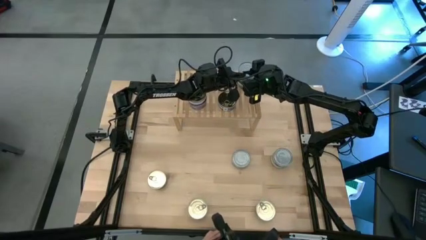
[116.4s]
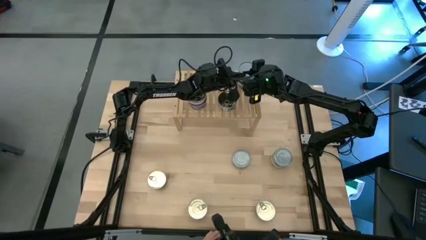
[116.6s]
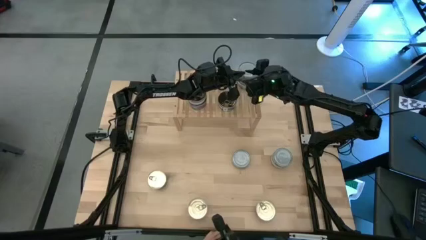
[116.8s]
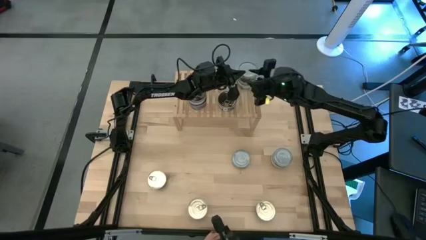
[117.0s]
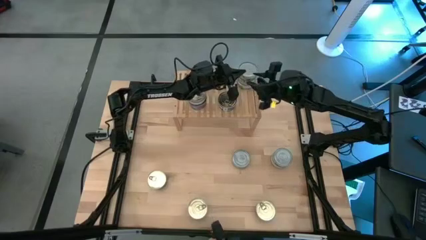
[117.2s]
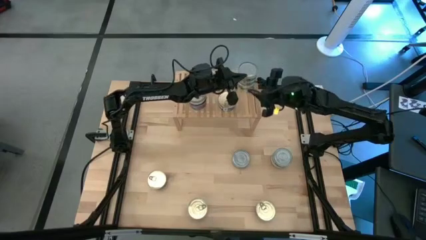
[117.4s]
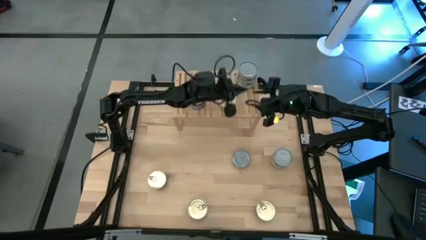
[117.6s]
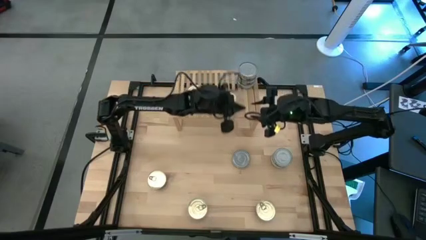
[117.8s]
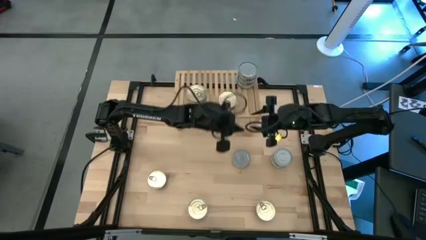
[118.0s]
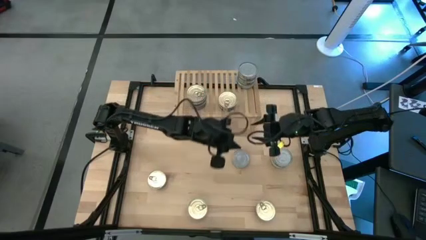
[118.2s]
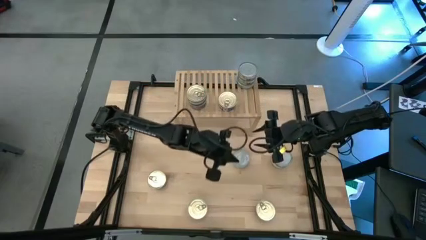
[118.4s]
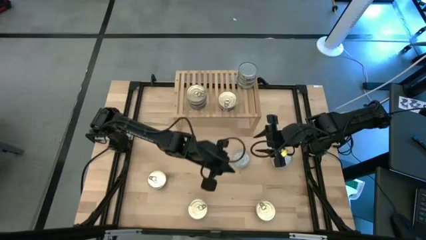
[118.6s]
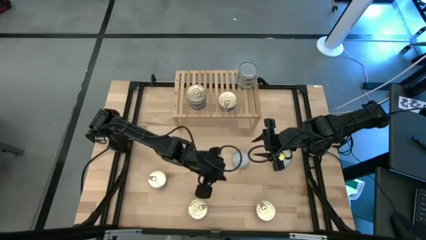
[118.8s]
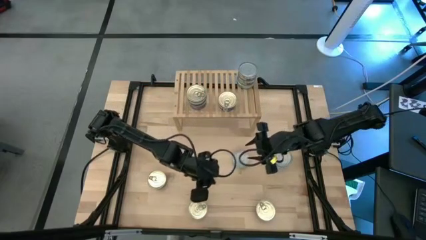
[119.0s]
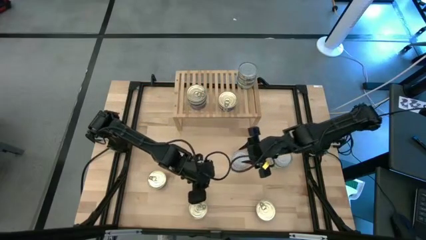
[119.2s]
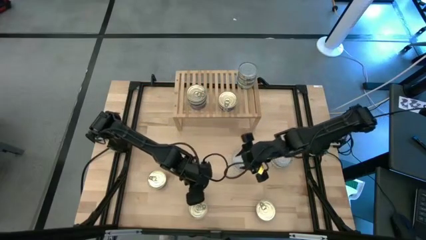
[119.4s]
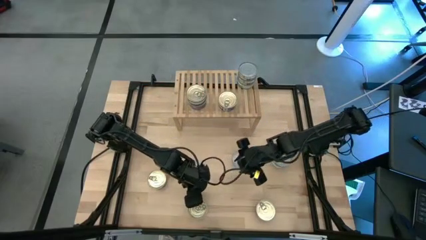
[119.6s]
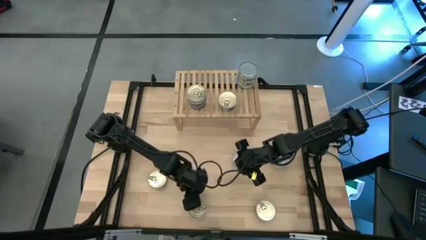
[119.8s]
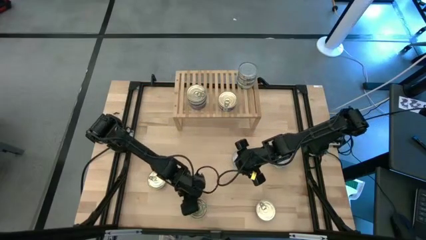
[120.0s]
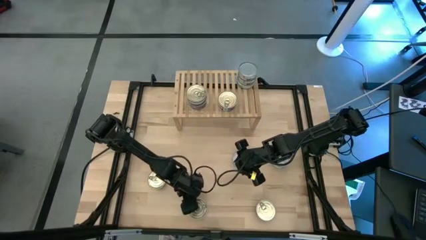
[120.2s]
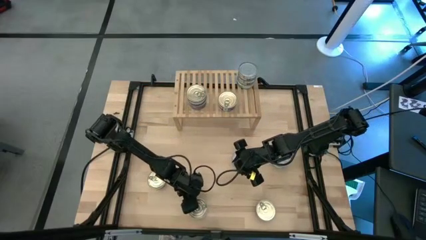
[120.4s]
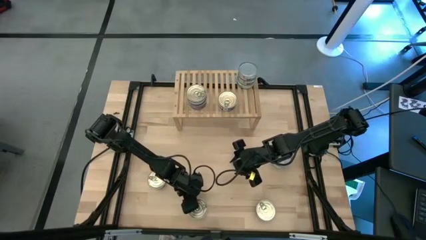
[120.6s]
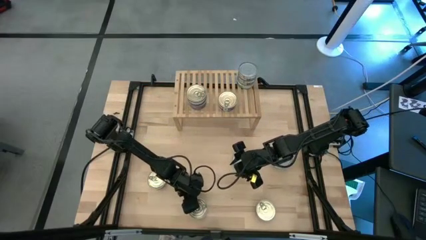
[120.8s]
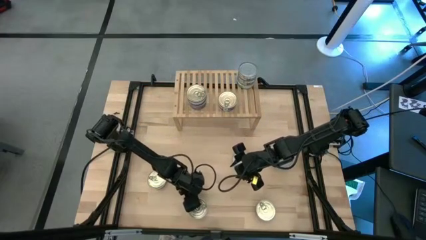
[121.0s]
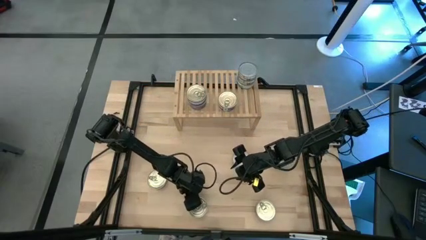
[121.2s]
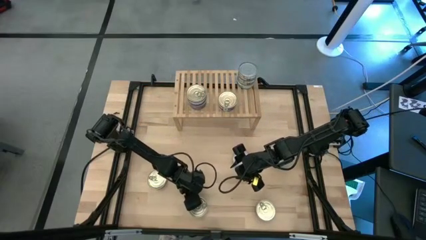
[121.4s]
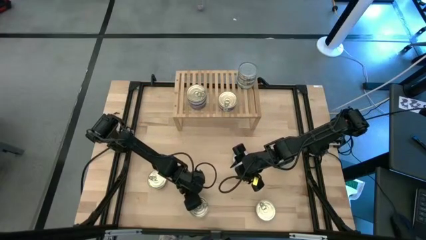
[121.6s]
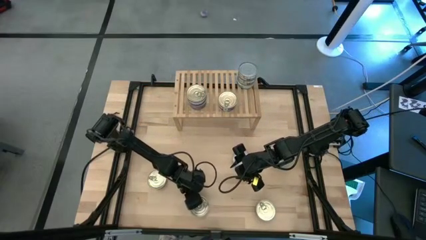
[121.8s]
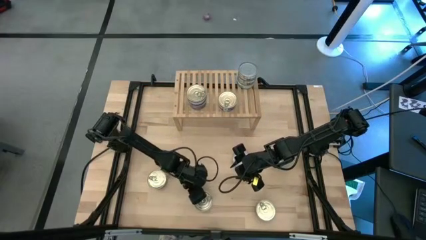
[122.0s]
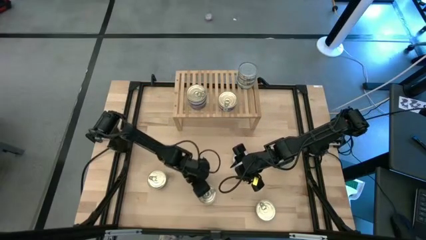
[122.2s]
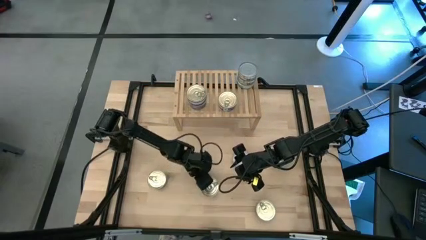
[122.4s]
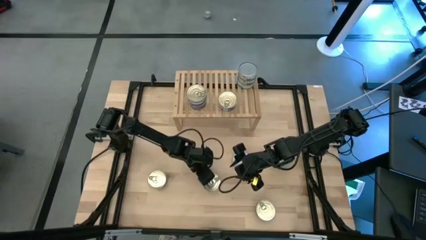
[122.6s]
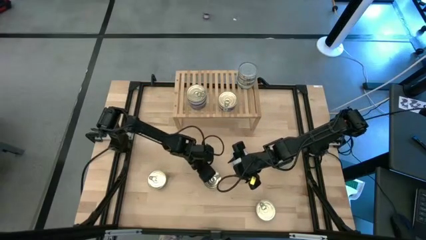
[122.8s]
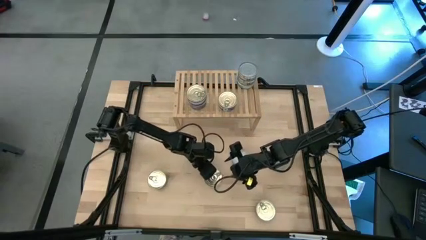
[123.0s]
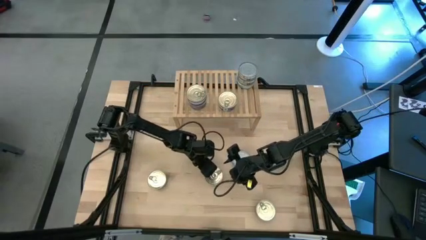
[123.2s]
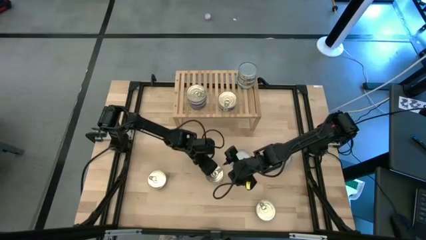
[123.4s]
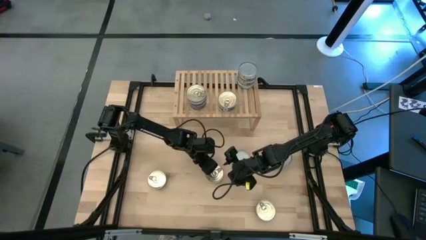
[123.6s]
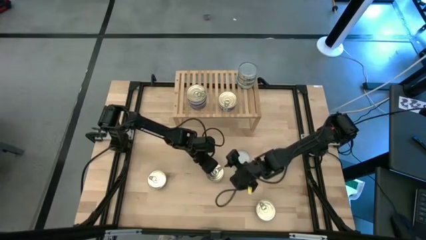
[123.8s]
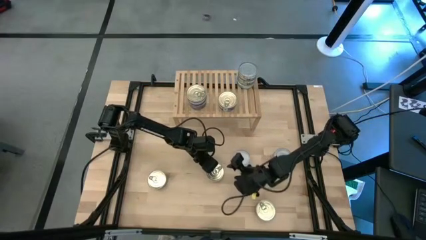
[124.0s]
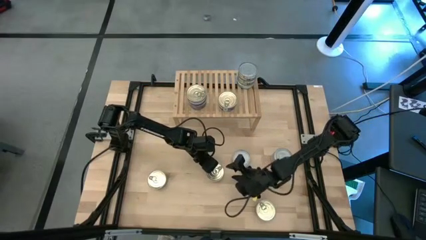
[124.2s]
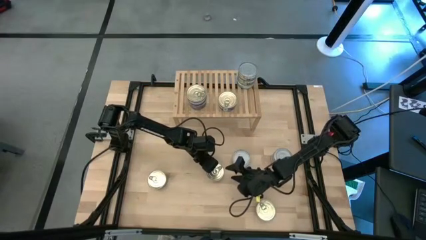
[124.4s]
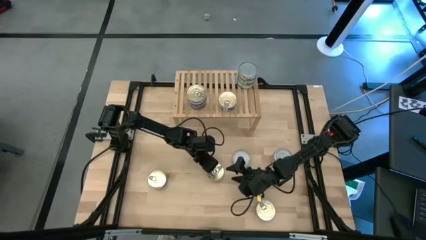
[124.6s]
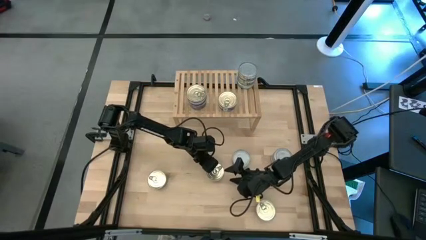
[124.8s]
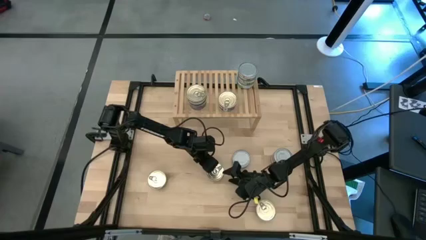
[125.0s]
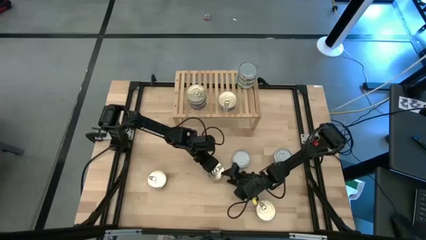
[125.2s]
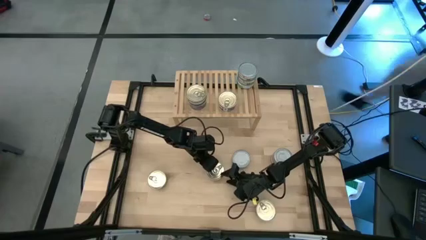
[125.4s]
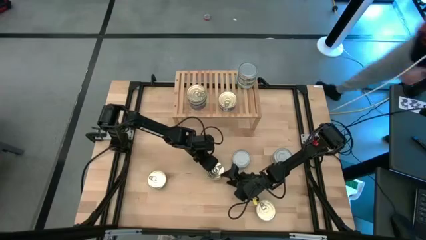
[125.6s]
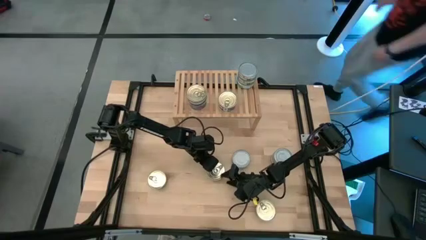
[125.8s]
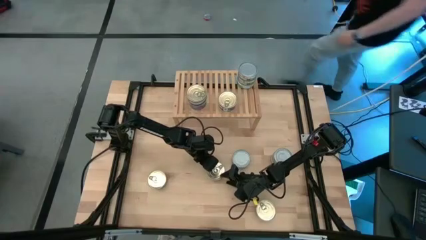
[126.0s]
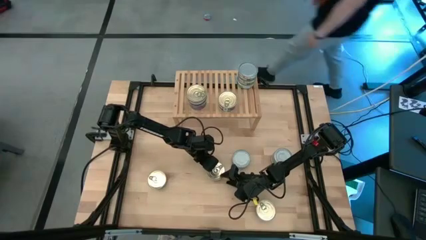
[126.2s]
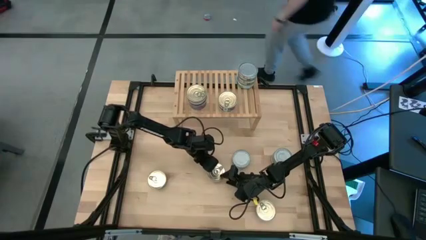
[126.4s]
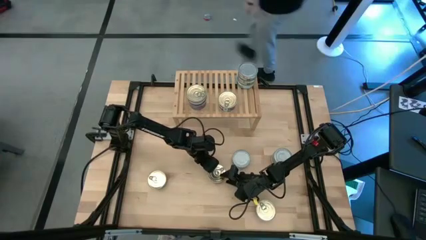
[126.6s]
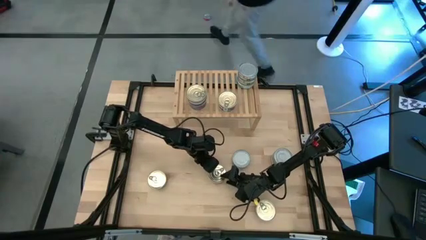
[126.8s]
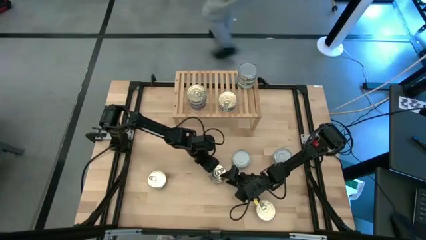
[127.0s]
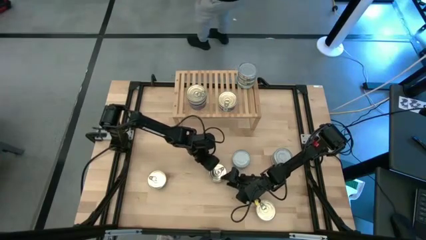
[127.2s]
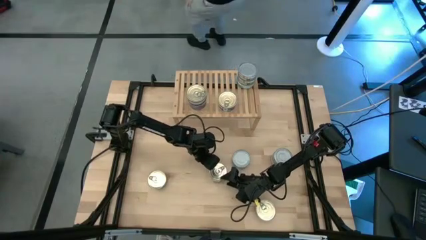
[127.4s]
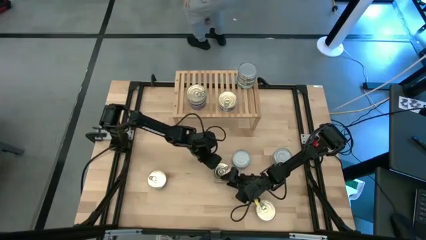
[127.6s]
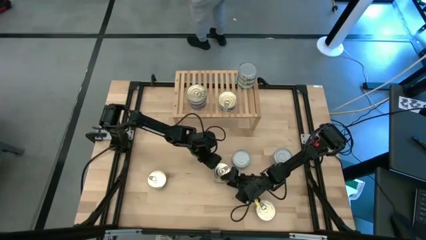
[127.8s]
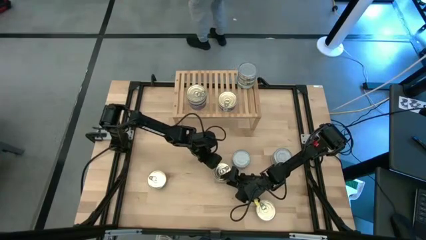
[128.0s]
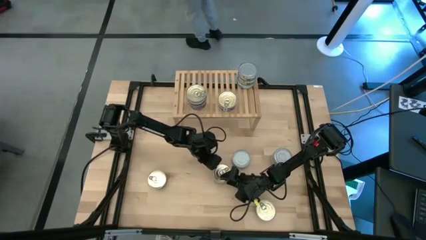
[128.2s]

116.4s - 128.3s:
Task: Stack canned seafood by type on shelf
Stack the blue tuna can on top of the blue tuna can on the shelf
